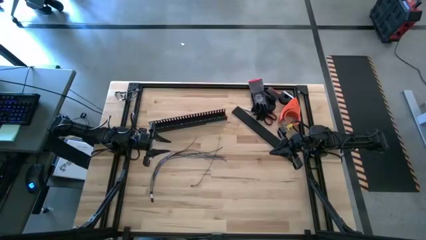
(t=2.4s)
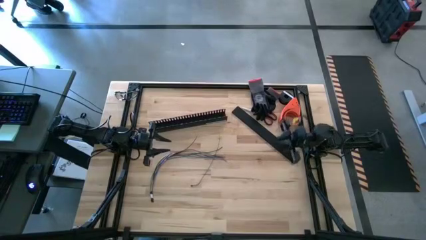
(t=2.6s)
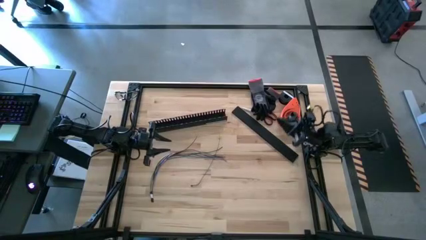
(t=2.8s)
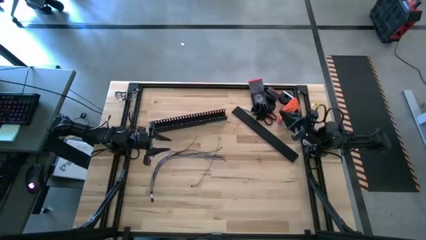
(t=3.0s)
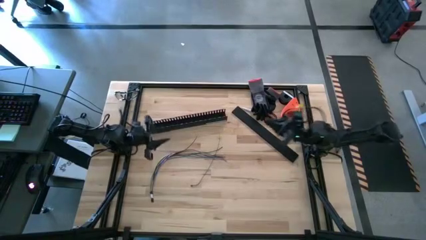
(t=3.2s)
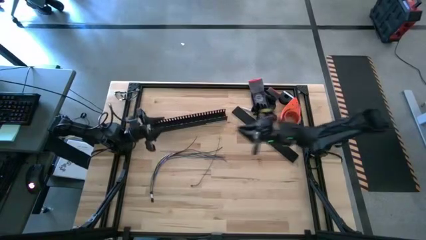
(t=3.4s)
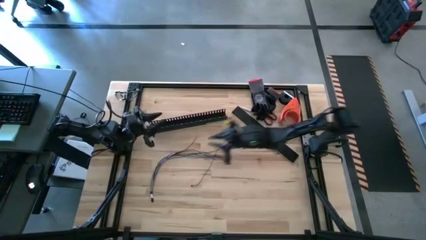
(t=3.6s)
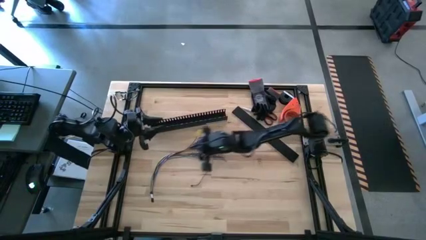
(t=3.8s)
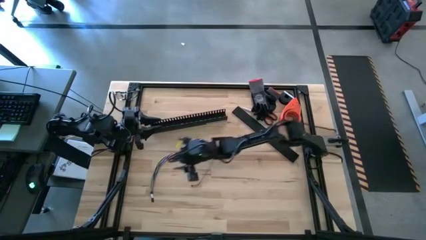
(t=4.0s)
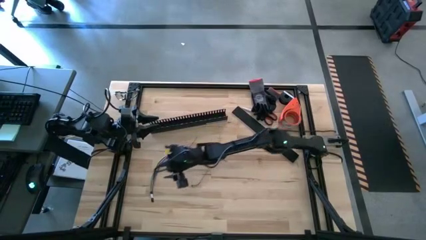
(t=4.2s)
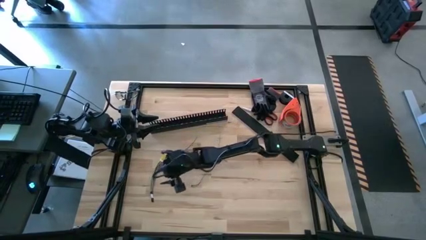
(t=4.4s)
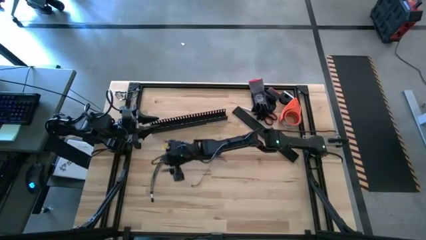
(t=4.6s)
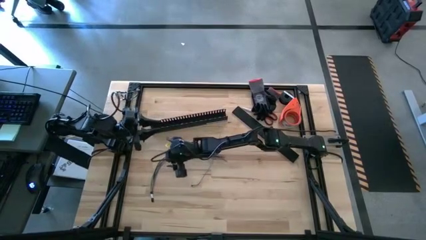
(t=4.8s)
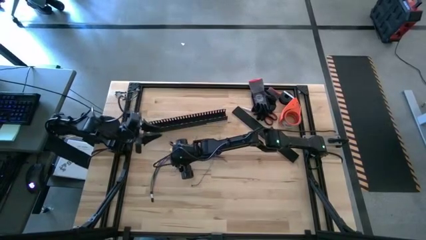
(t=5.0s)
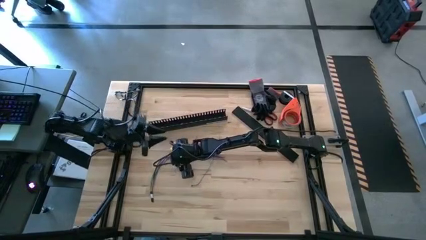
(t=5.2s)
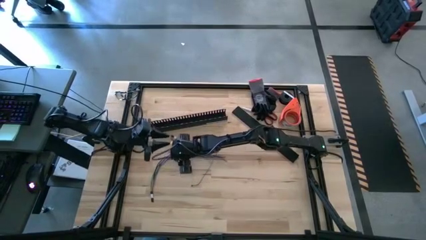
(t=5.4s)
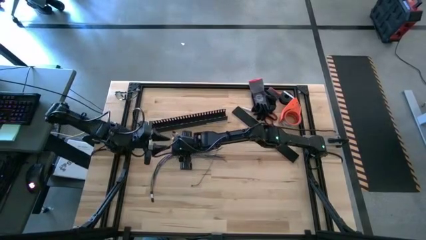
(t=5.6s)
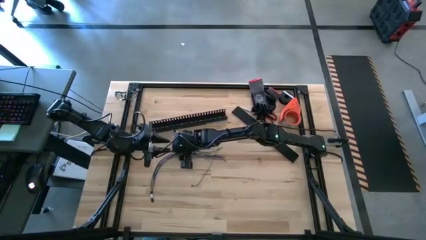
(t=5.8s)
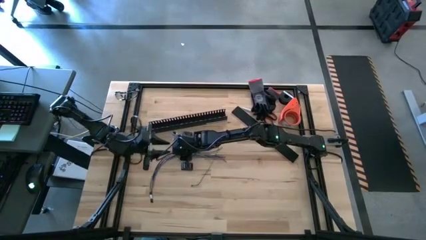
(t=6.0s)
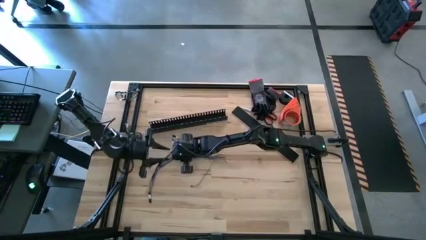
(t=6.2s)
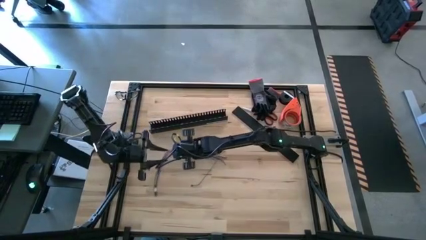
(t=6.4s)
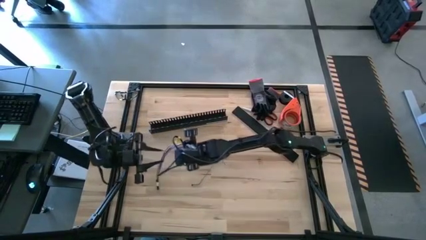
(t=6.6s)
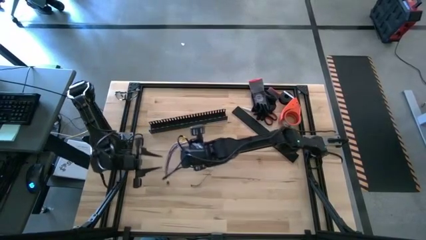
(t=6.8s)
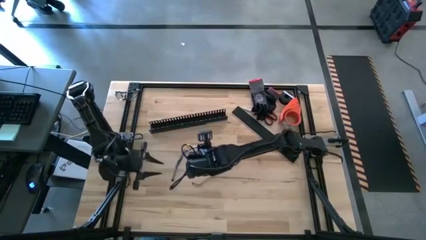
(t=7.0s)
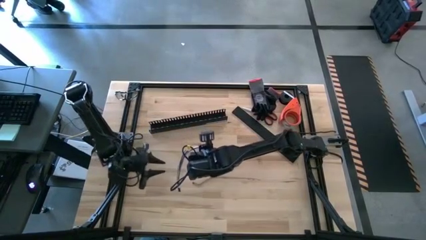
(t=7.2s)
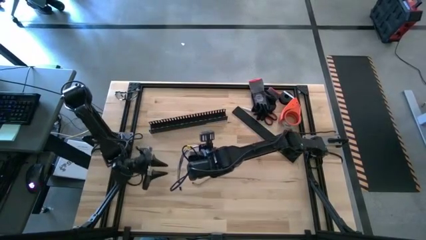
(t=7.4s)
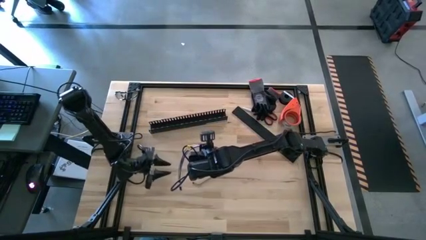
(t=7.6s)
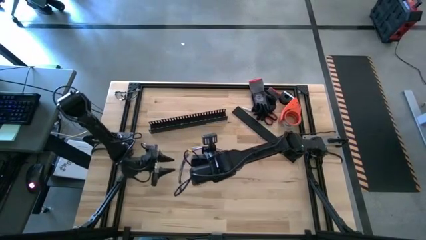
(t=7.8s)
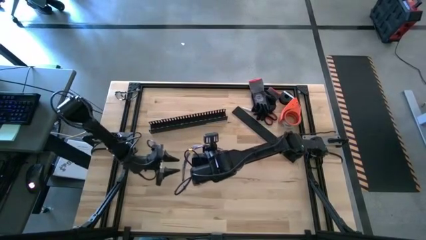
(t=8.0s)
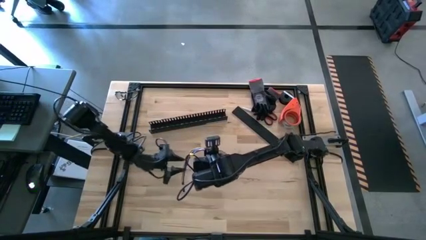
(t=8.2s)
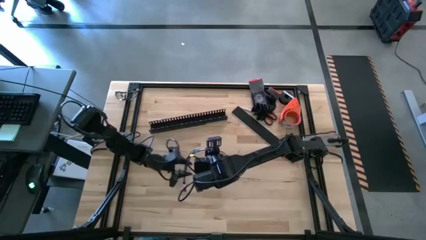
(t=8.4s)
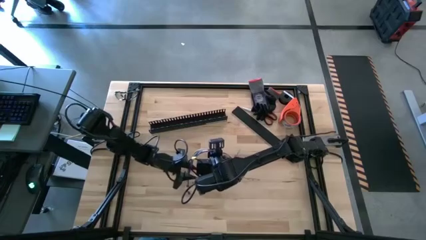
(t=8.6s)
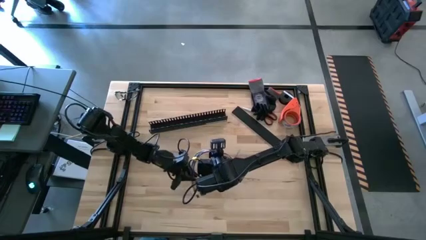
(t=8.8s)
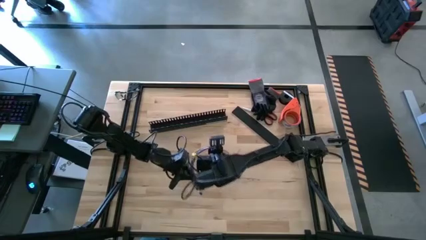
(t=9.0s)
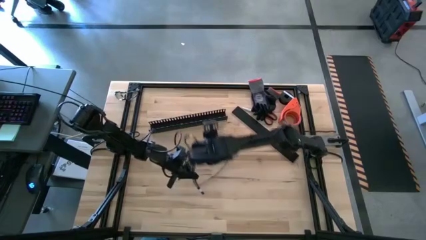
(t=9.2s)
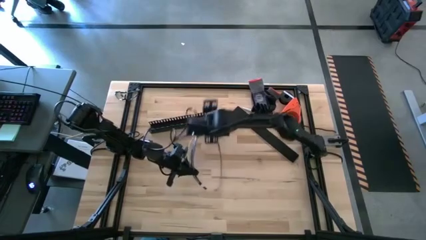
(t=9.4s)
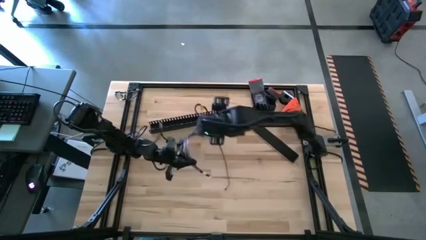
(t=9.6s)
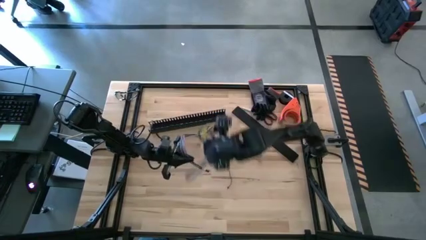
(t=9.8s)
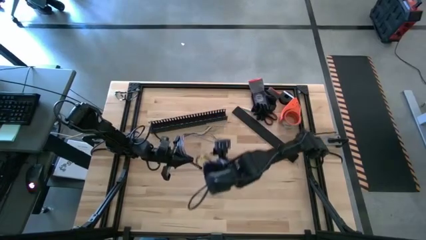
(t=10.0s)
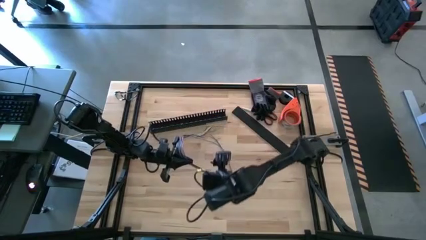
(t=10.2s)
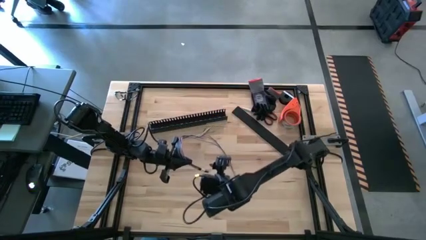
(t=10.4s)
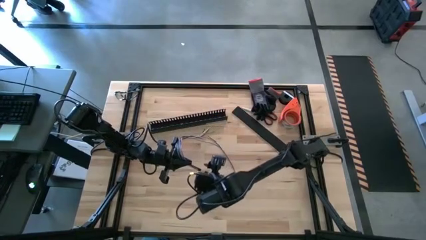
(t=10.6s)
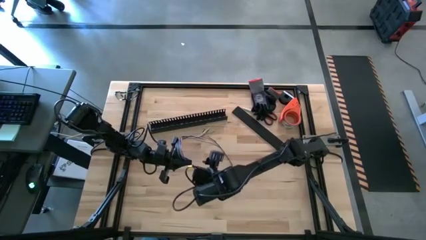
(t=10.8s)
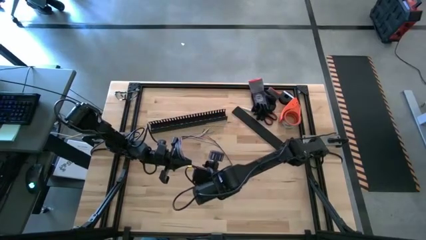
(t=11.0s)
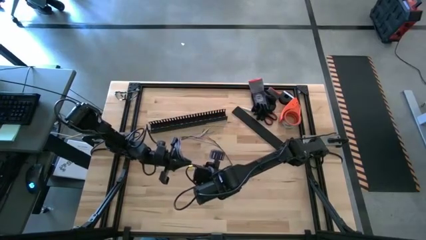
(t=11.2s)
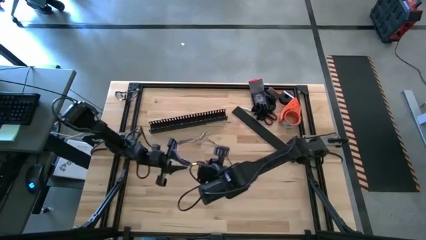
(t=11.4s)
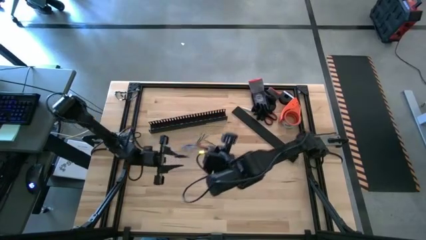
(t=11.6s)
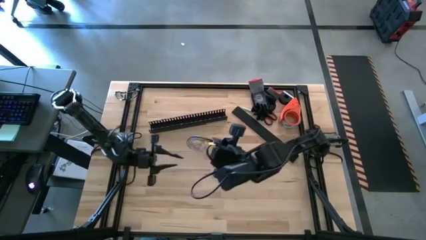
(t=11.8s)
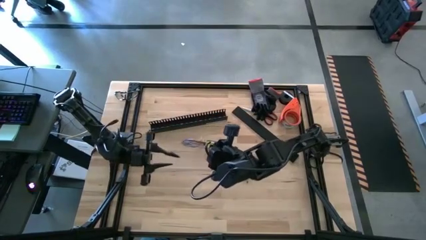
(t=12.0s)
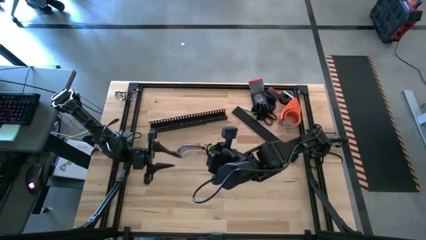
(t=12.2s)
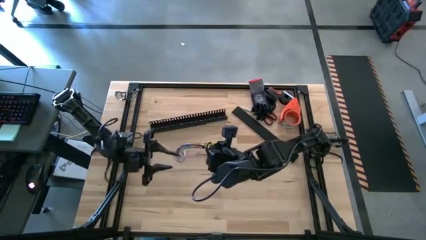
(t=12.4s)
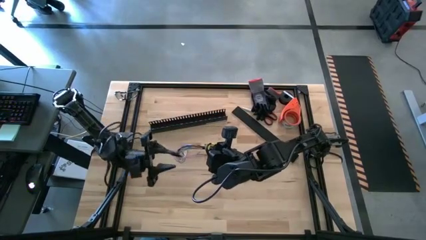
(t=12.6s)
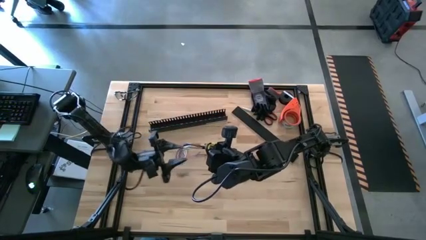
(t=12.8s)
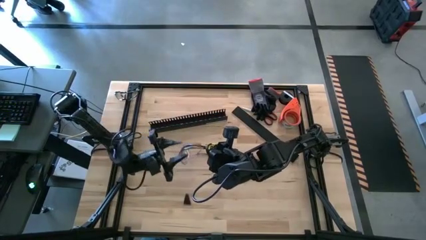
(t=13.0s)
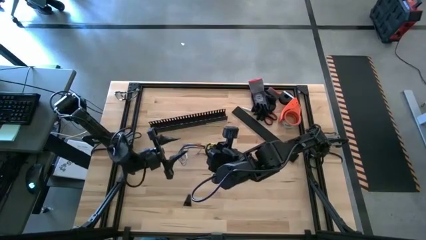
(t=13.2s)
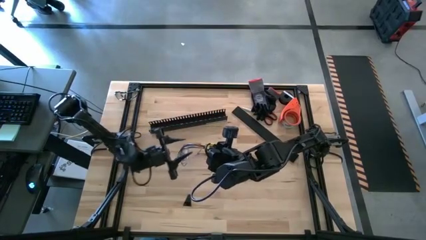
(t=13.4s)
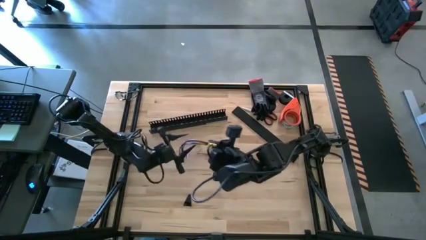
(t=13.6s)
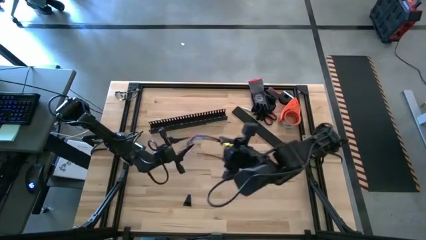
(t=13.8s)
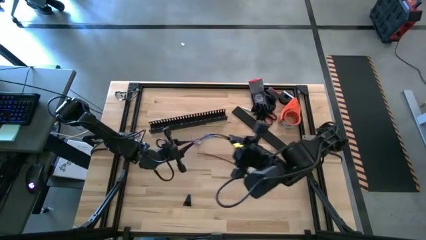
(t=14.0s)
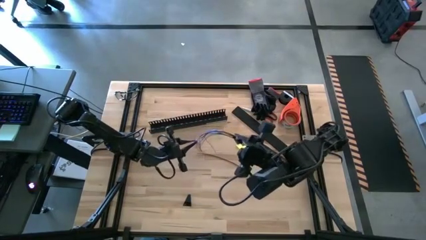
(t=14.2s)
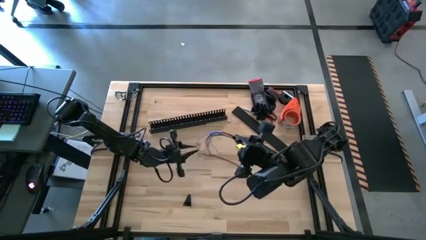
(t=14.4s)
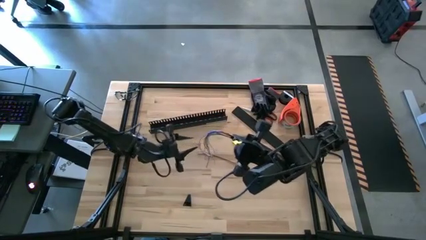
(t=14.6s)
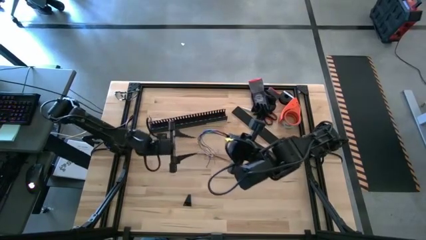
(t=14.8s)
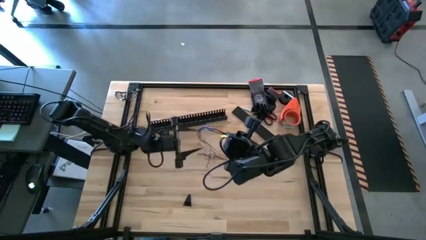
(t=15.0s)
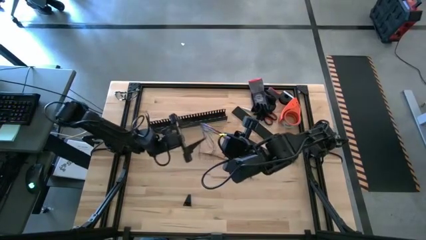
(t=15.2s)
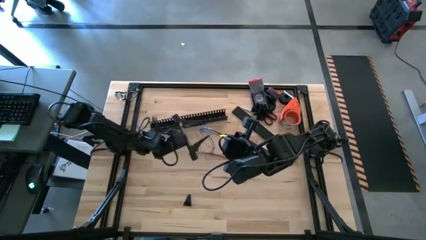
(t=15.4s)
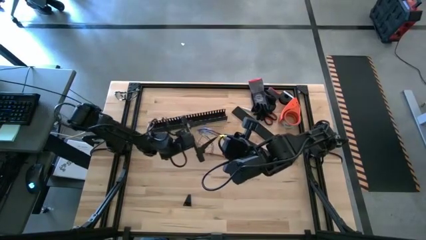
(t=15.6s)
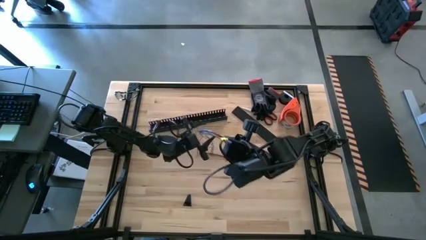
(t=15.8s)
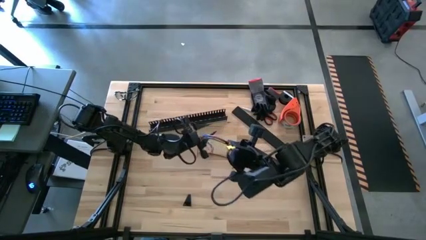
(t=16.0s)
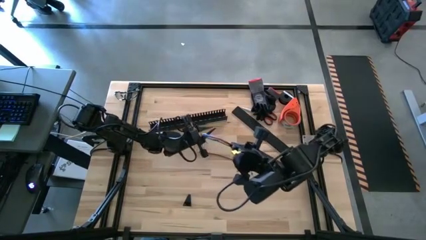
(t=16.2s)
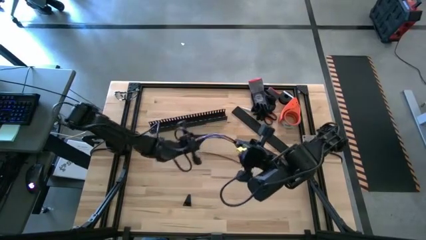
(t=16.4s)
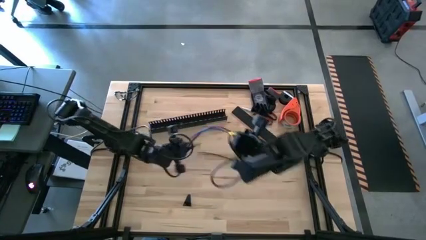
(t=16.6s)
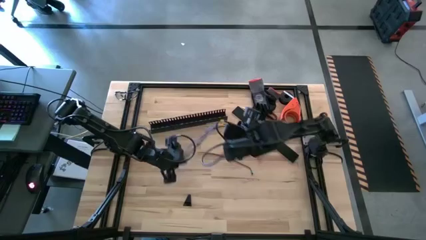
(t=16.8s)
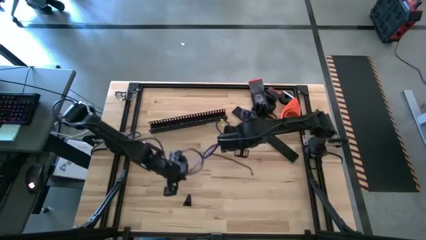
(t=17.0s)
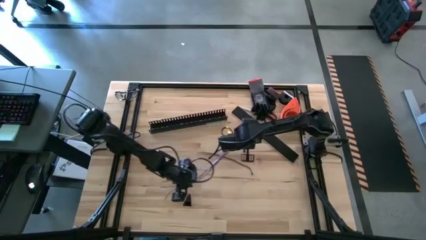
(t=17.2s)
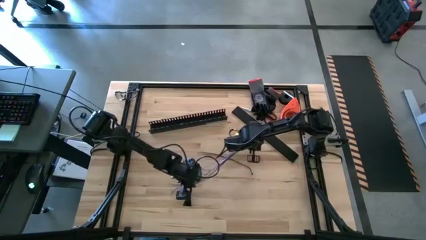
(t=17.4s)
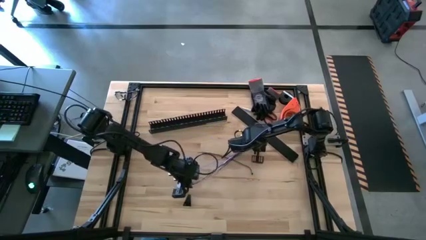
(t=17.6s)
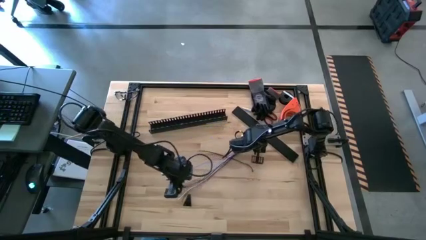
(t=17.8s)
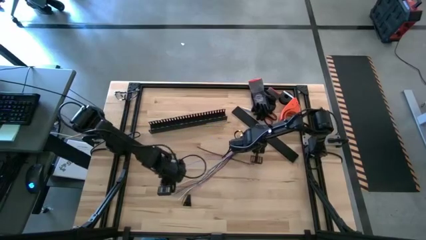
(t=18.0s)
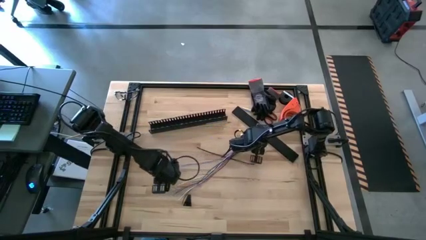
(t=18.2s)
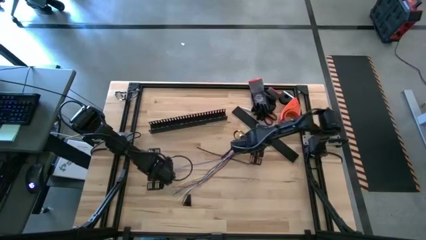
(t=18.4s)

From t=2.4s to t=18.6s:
Task: Ziptie cables
Wrap the colored cables together using a zip tie
